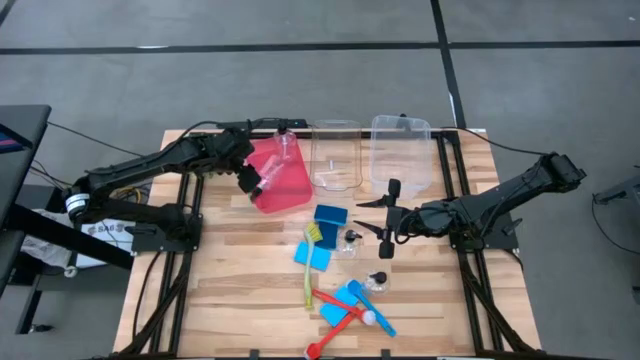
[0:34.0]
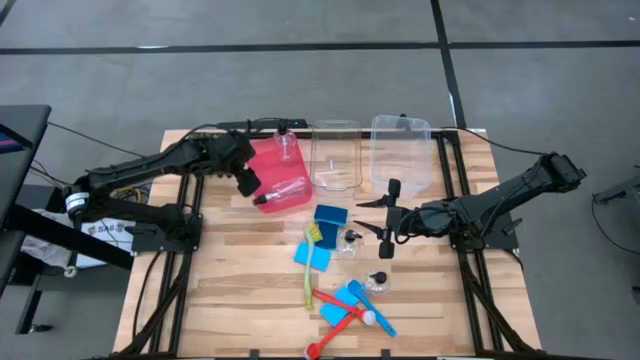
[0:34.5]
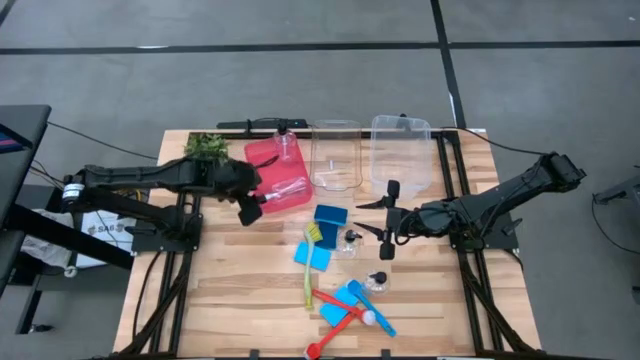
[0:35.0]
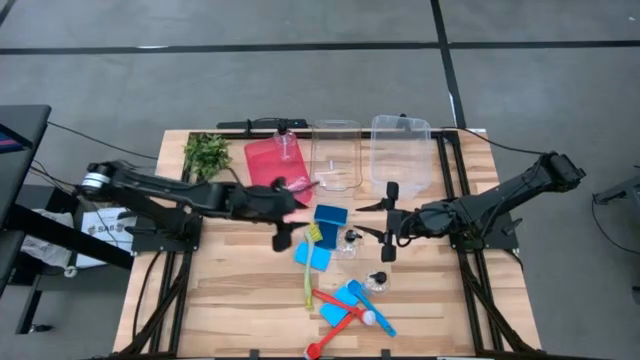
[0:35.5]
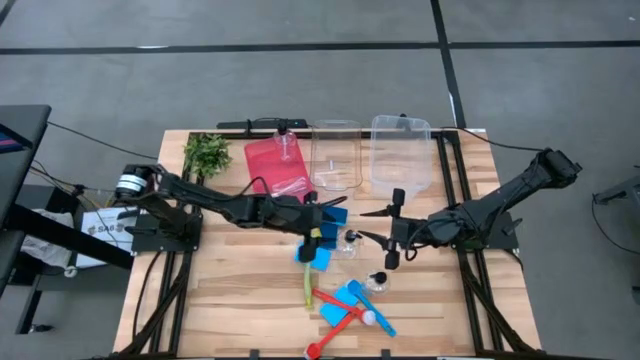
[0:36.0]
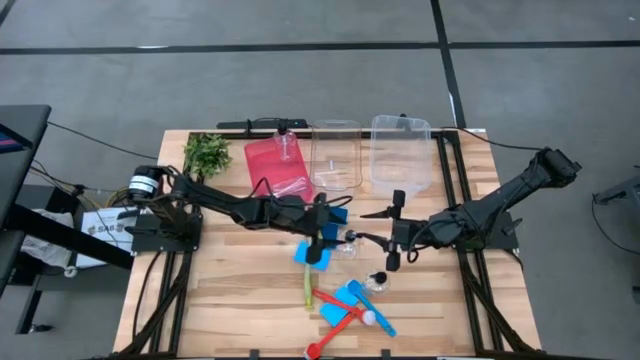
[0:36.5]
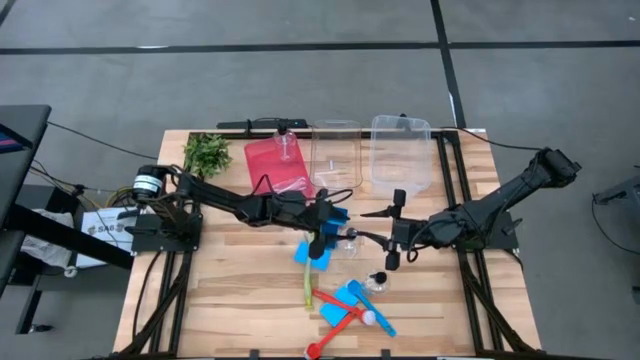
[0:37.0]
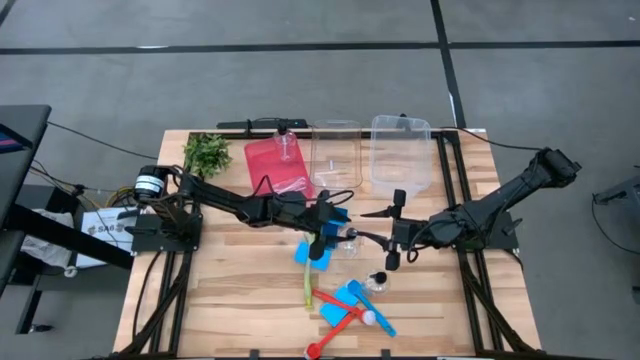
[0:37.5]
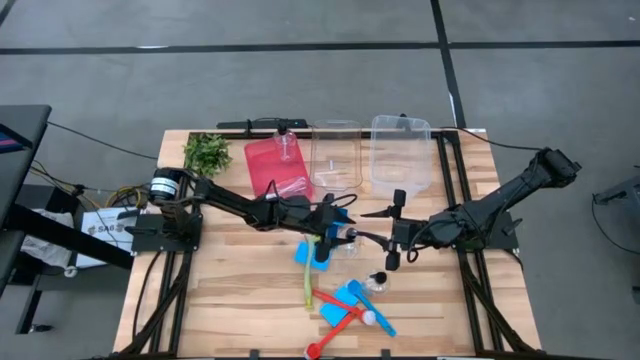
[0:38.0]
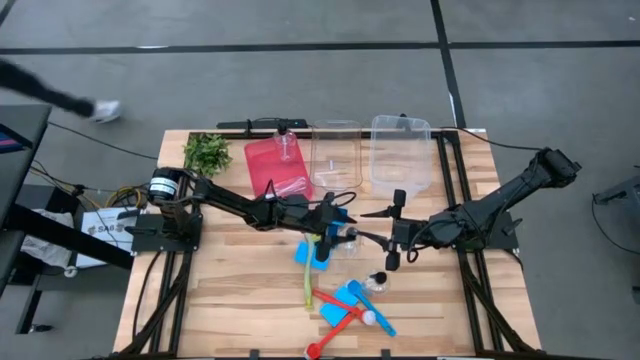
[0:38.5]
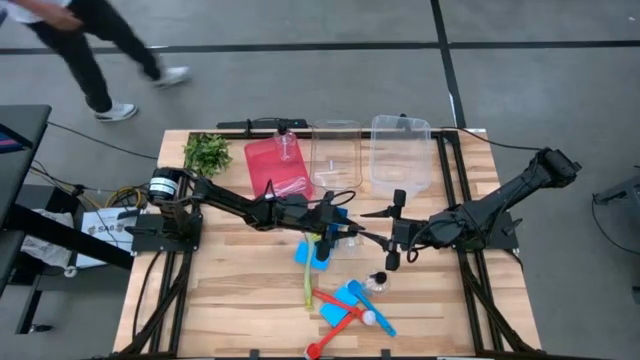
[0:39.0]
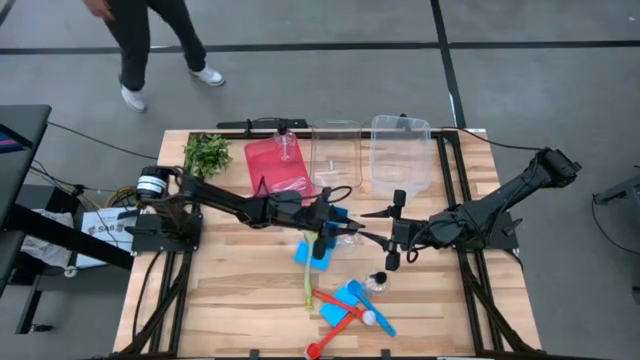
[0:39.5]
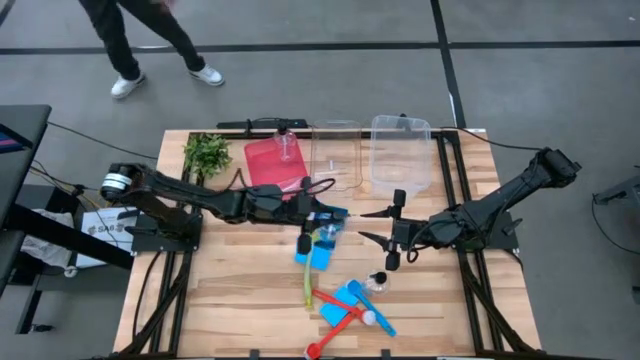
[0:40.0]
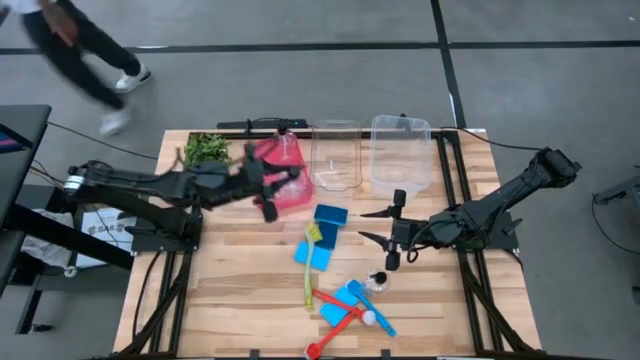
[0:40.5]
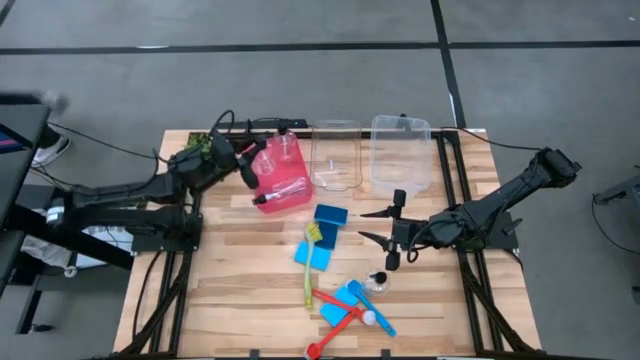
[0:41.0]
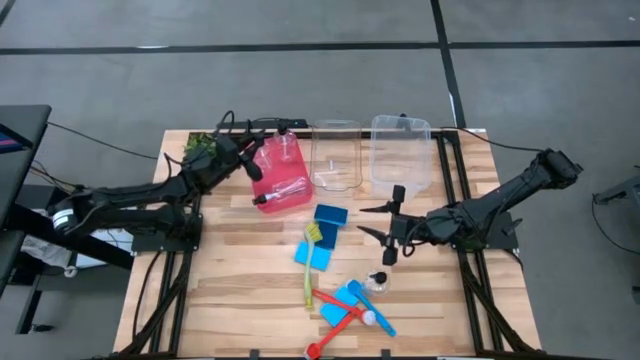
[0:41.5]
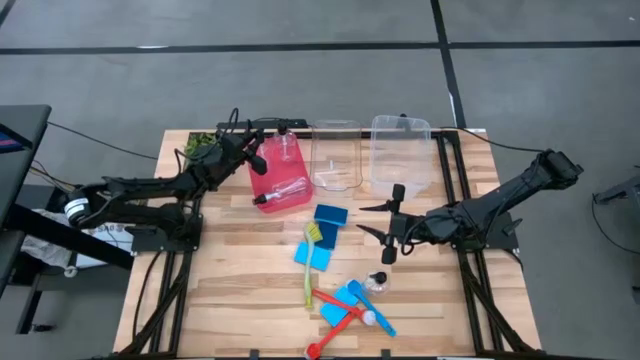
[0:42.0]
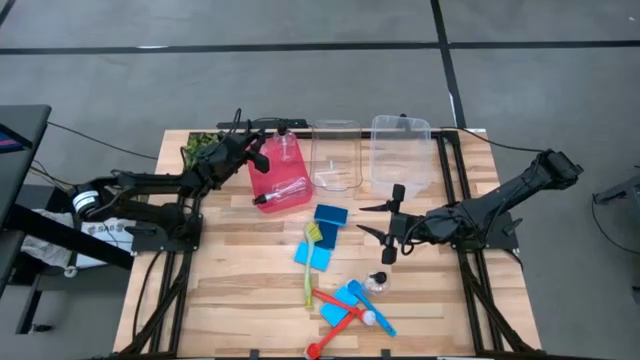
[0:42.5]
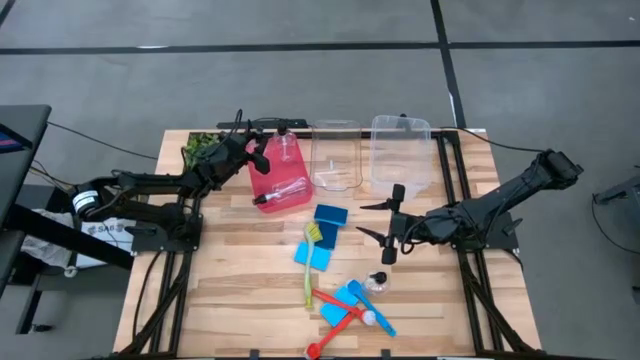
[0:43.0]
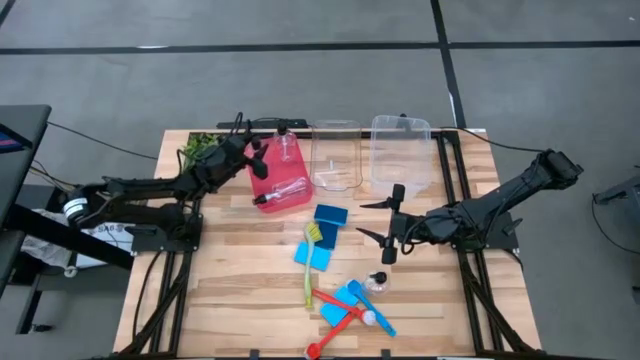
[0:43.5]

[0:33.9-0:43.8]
Task: Pick & Place Kitchen Sink Supplies
Put the transparent soap dispenser into the red bin

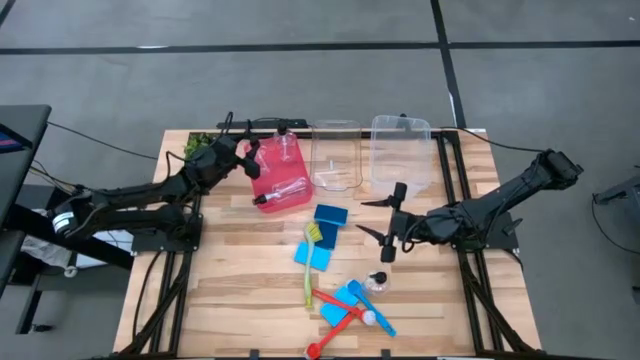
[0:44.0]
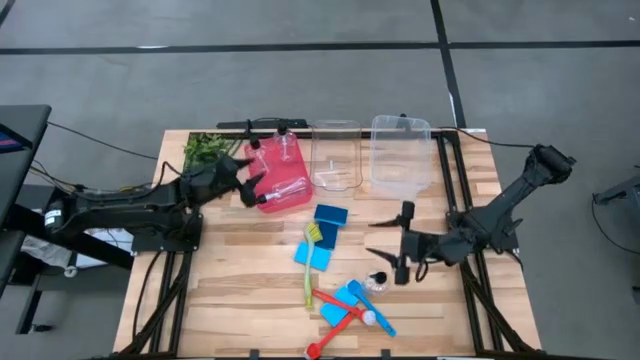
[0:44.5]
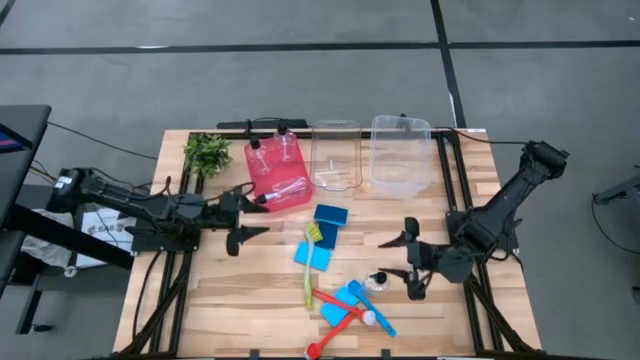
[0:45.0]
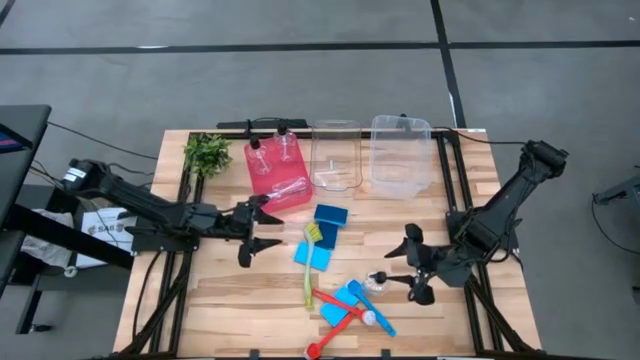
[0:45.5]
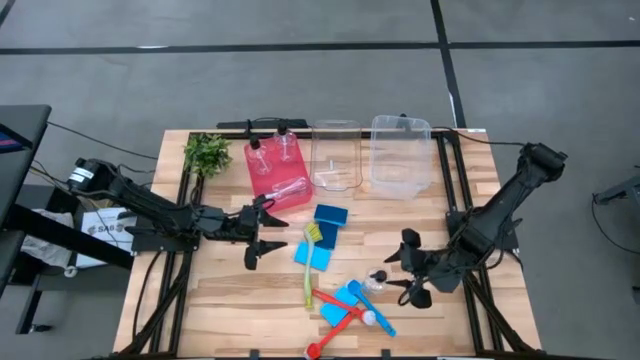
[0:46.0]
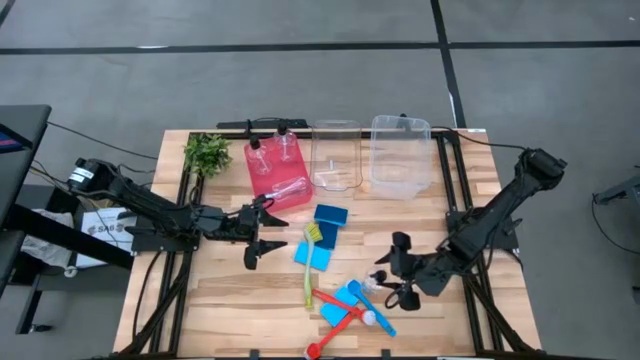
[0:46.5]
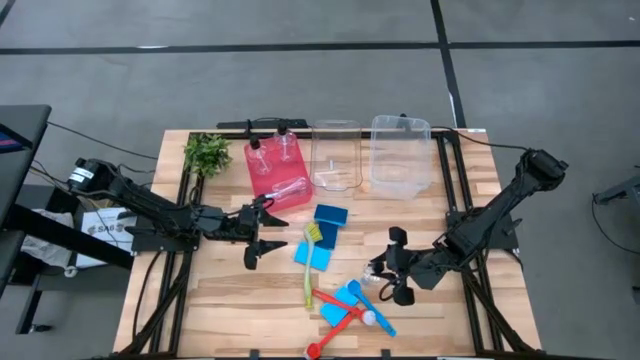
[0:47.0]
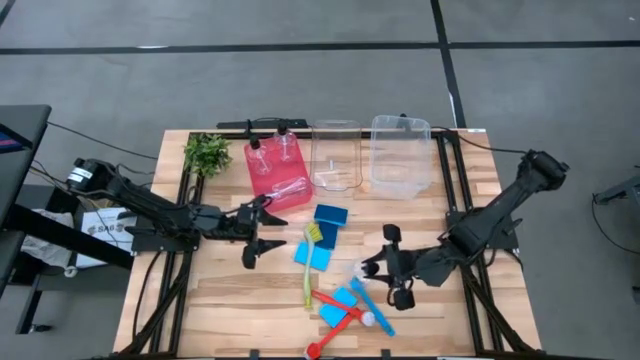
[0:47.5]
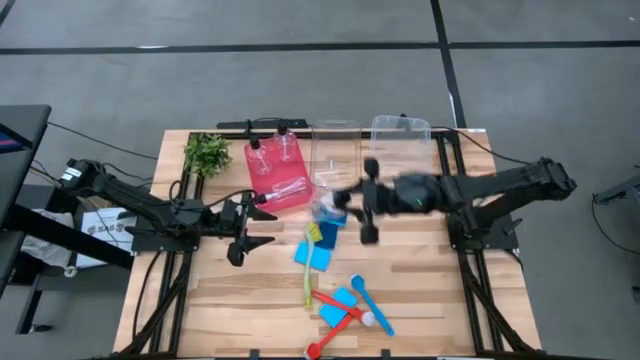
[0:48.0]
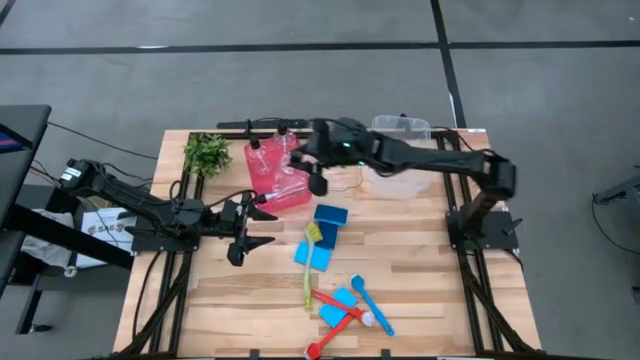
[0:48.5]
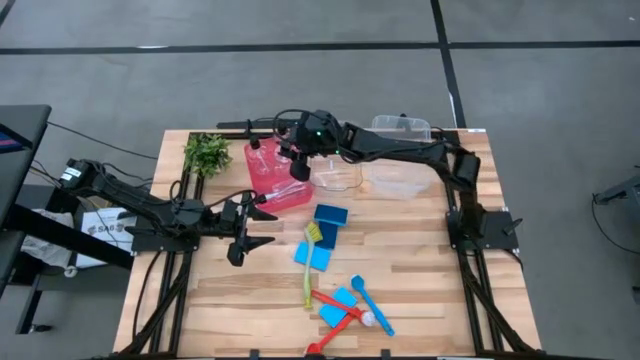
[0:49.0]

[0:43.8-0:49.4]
Put the transparent soap dispenser into the red bin

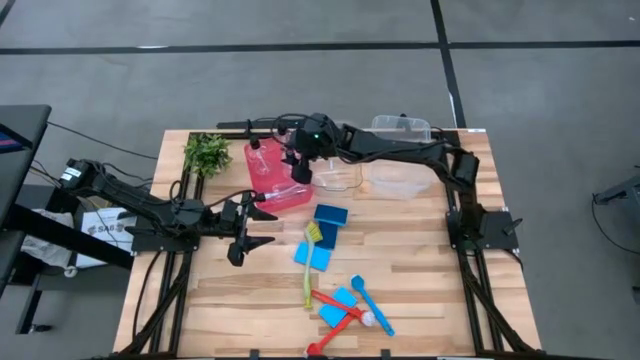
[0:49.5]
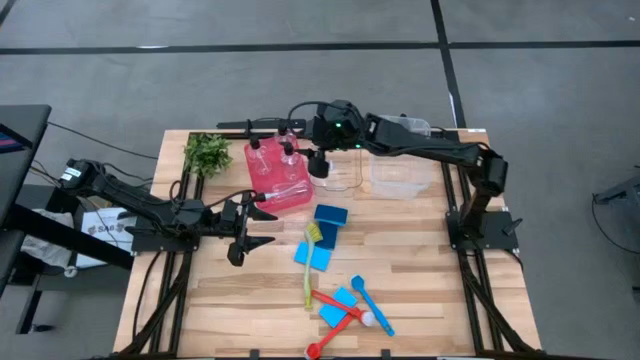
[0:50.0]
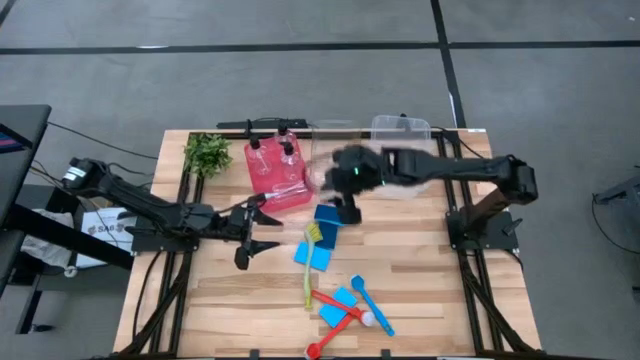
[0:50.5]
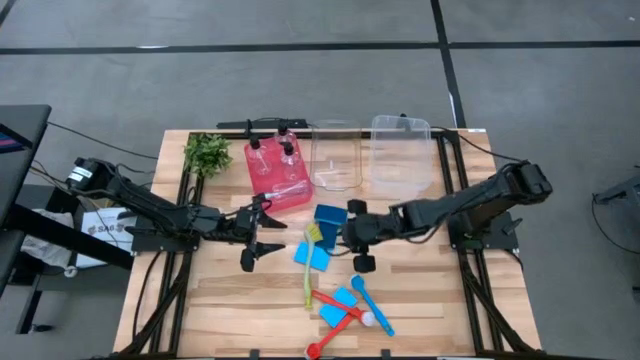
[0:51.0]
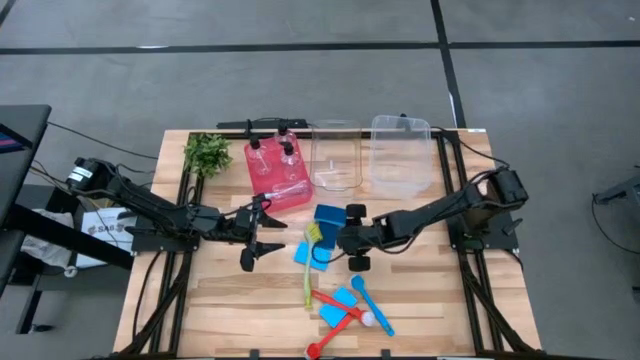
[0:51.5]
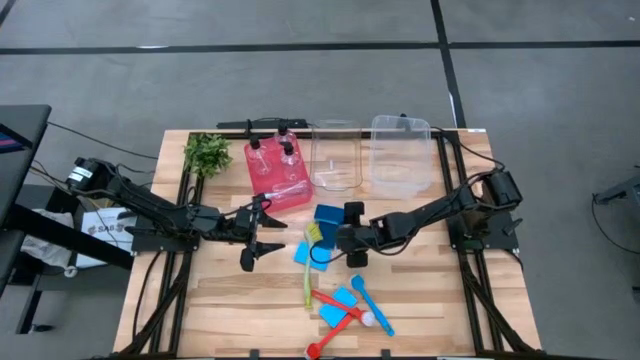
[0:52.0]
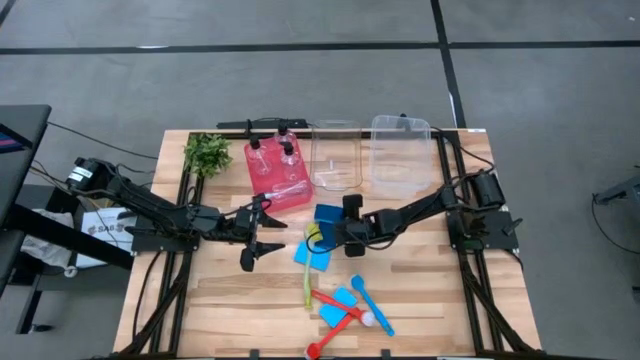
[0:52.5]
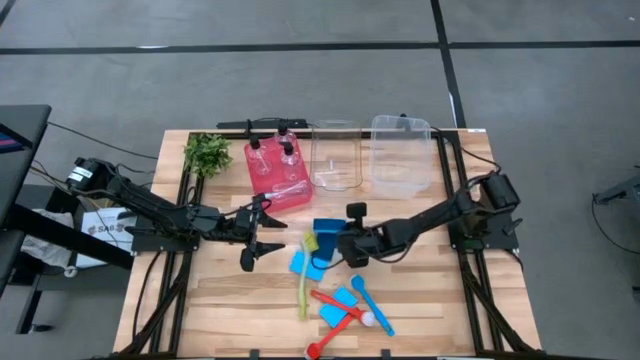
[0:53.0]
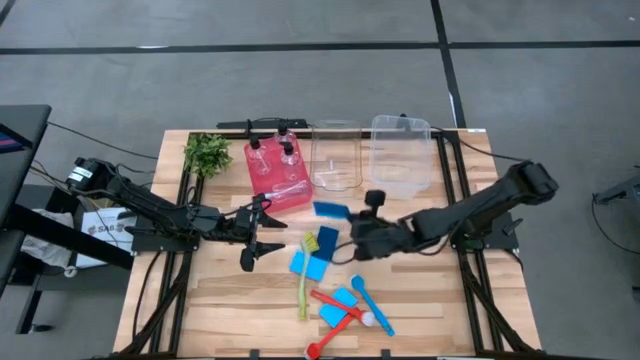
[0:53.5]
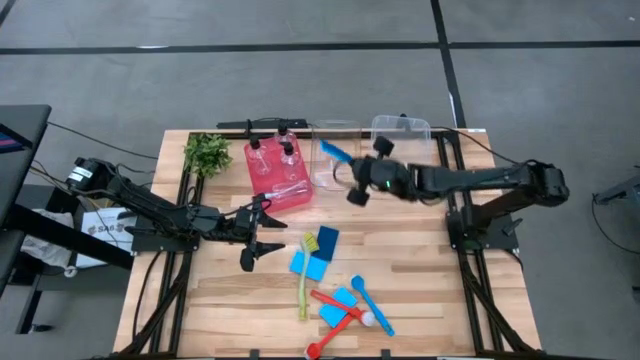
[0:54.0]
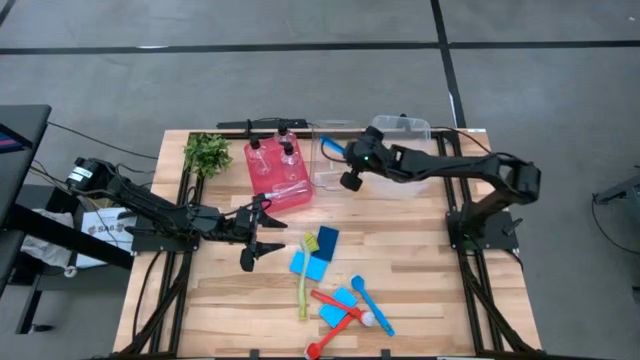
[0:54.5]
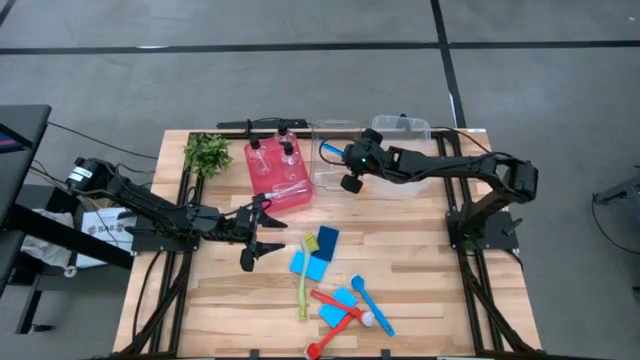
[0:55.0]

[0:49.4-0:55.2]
Put the blue sponge into the left transparent bin
